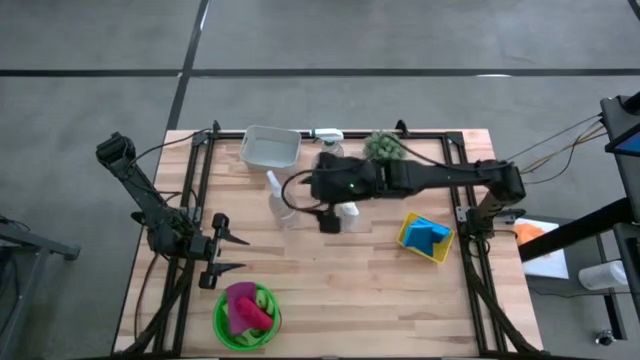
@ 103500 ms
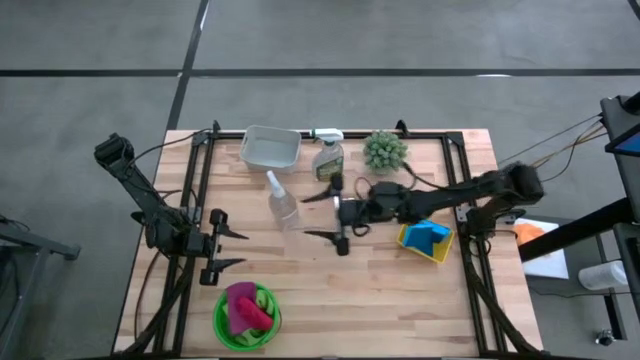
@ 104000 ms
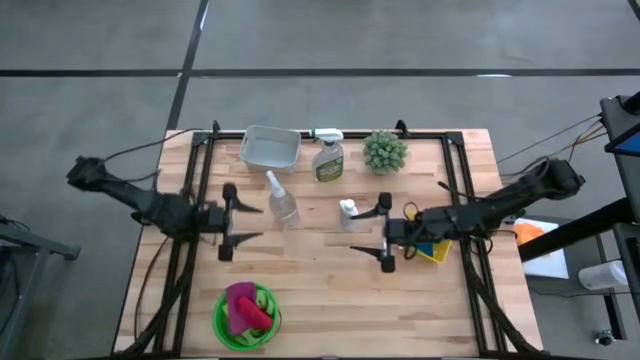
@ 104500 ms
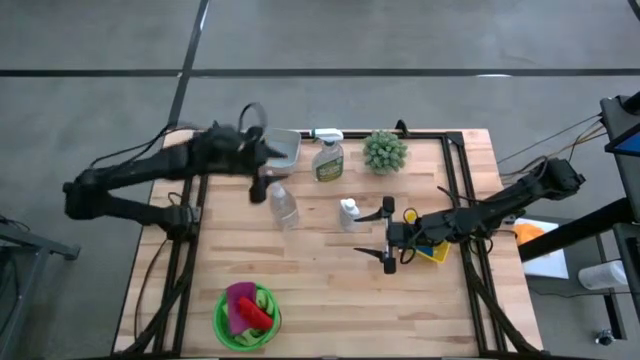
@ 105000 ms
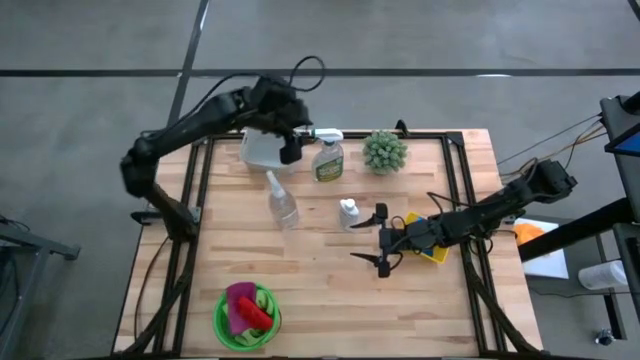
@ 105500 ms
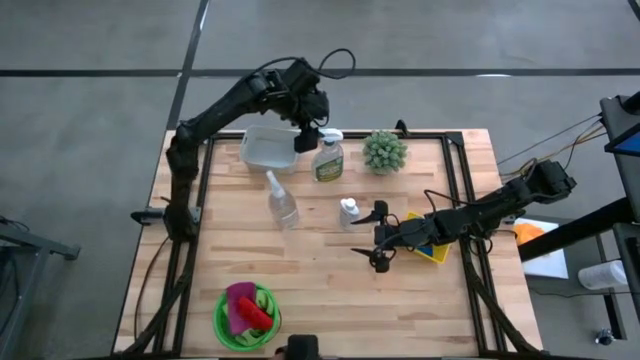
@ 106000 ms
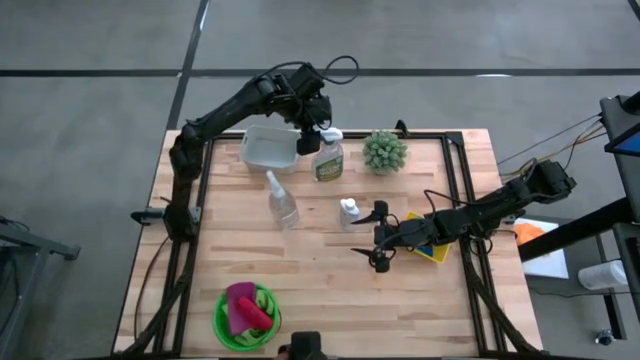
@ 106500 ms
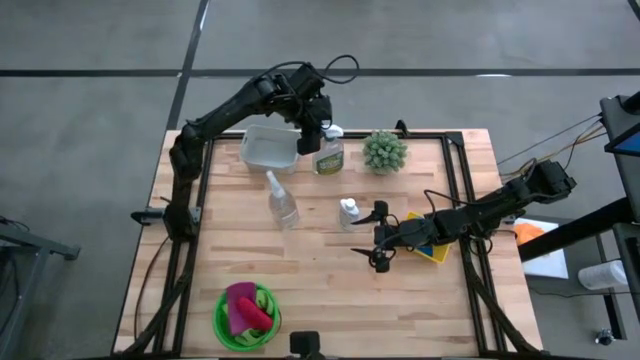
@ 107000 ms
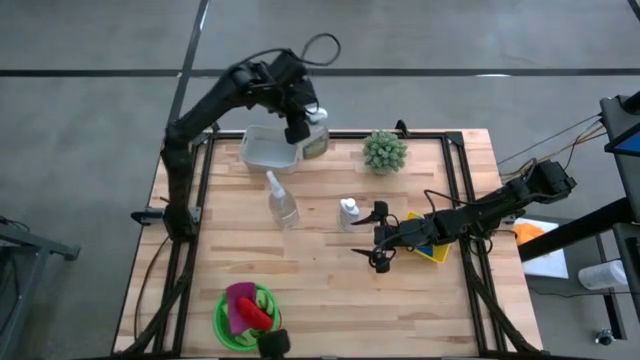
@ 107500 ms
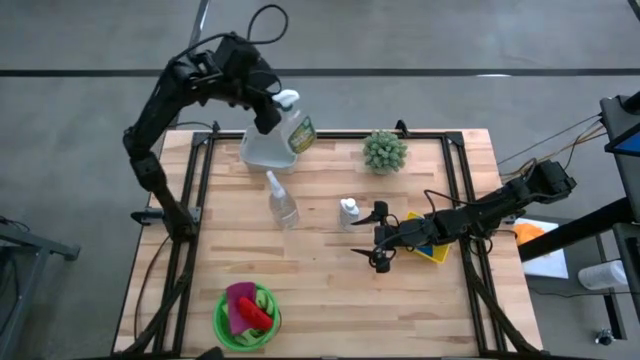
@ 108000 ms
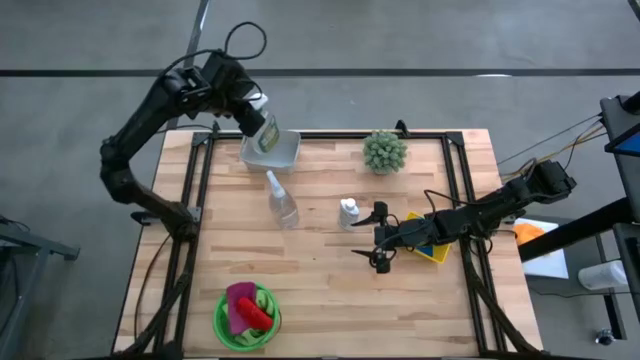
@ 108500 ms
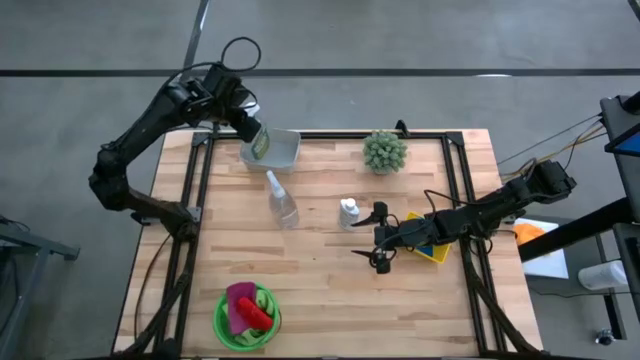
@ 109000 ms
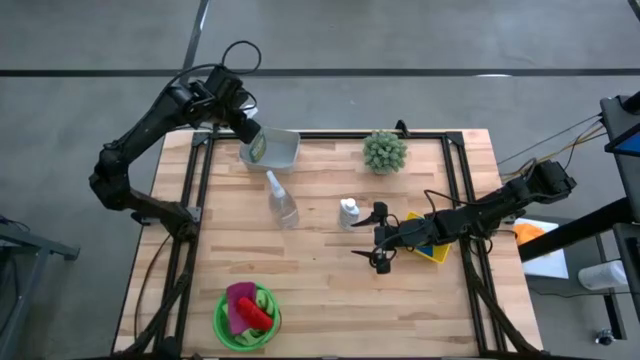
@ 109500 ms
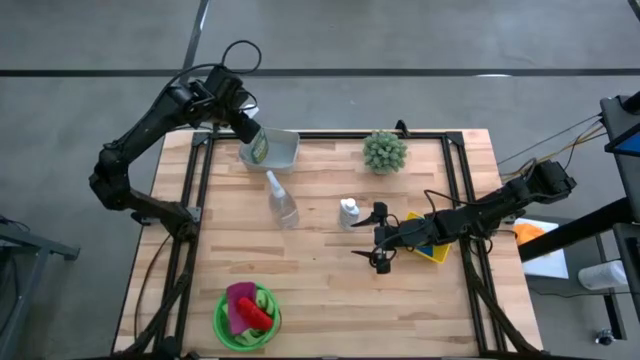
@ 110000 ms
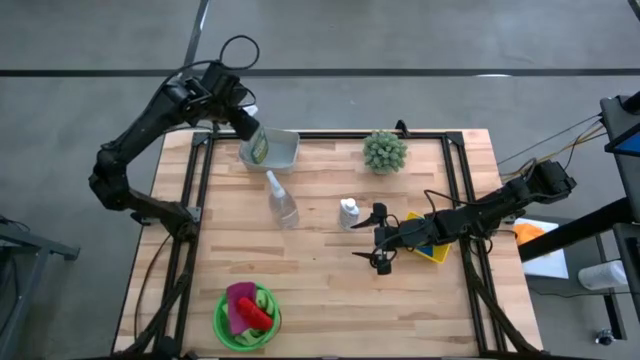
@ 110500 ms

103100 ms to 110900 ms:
Task: Pick & Place Kitchen Items
Put the white spray bottle into the gray bin

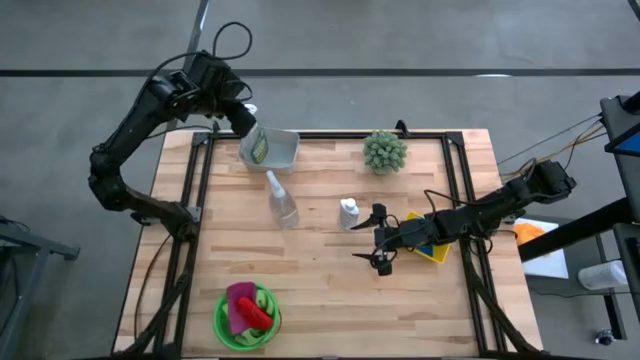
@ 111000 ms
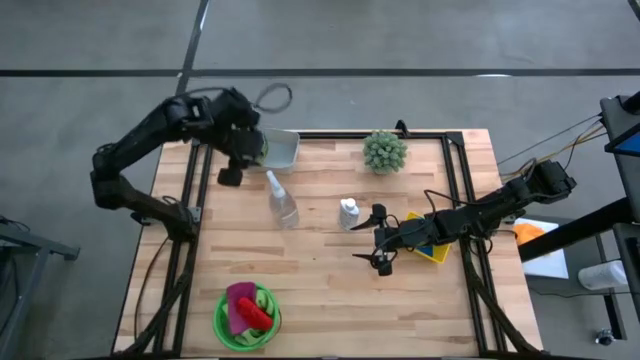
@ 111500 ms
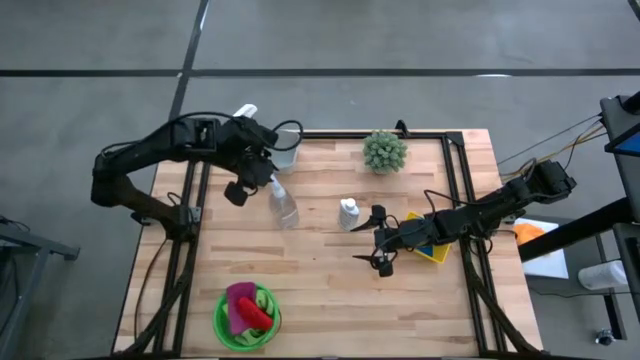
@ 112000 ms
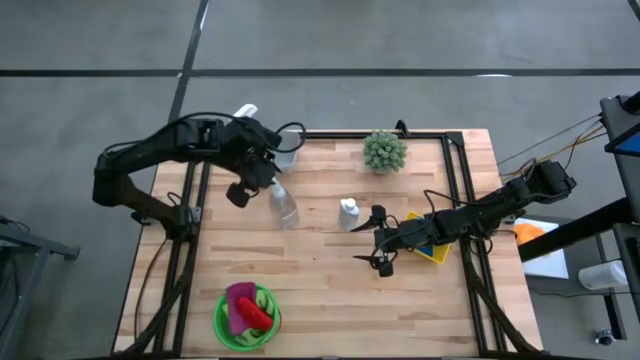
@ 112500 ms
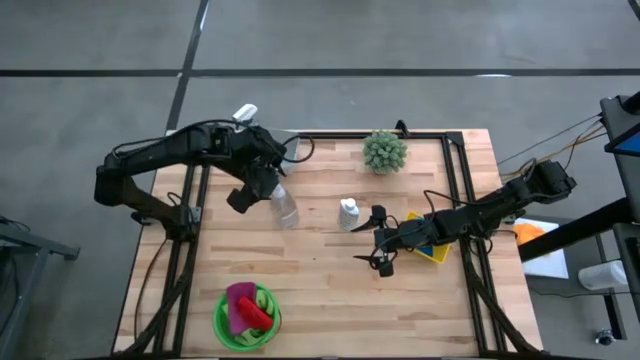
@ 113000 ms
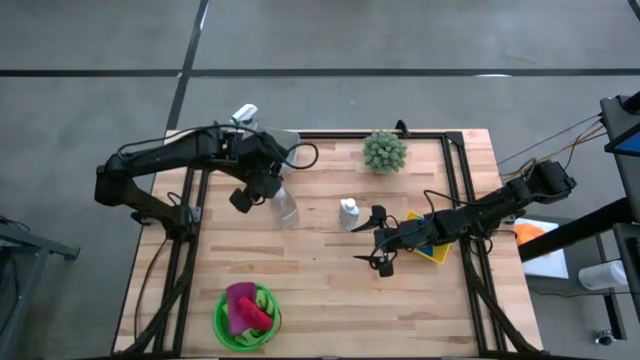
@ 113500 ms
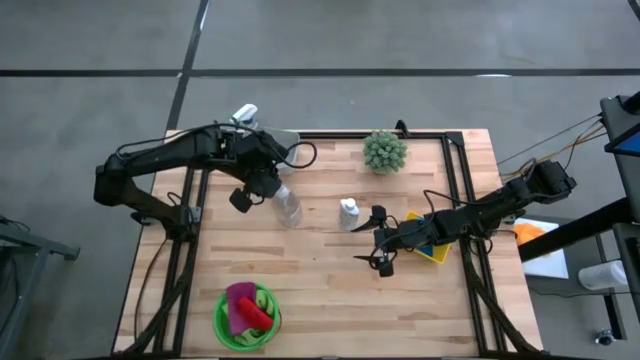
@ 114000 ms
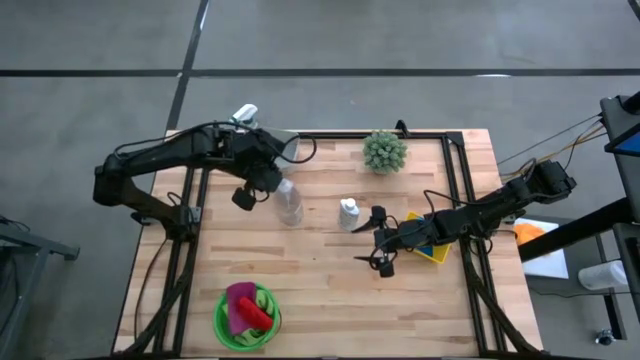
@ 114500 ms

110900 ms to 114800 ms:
Put the transparent spray bottle into the gray bin

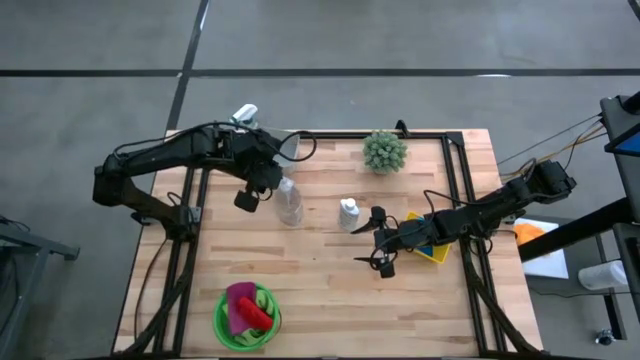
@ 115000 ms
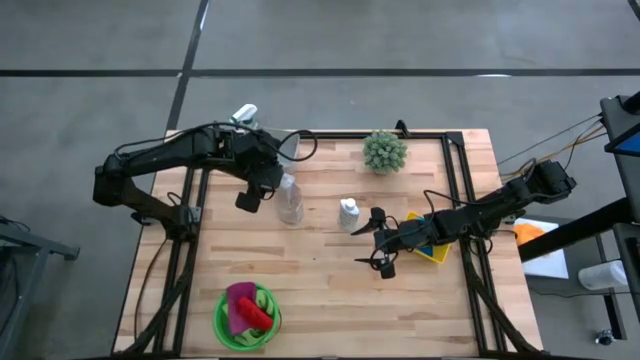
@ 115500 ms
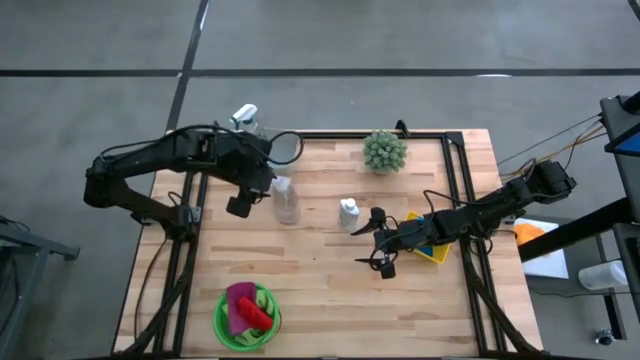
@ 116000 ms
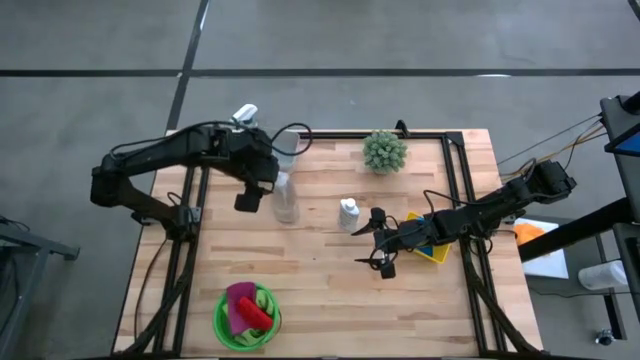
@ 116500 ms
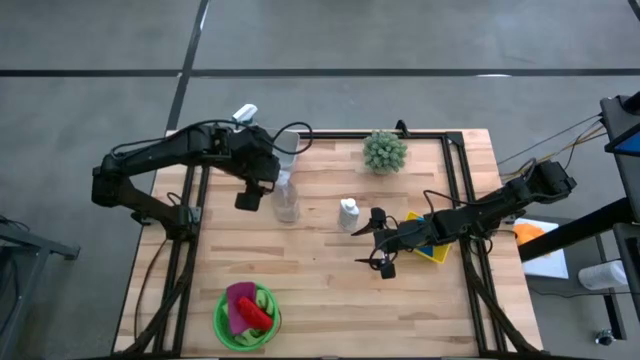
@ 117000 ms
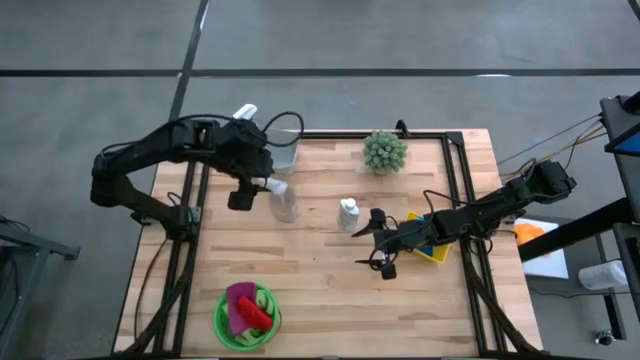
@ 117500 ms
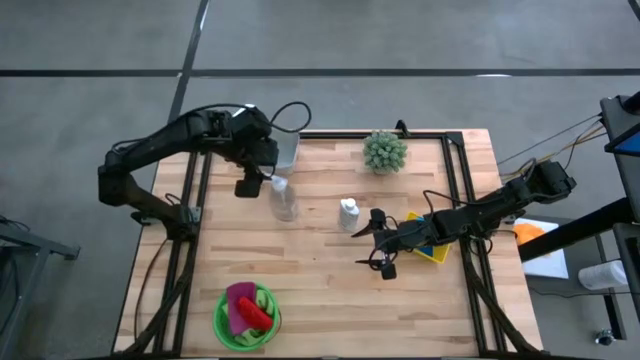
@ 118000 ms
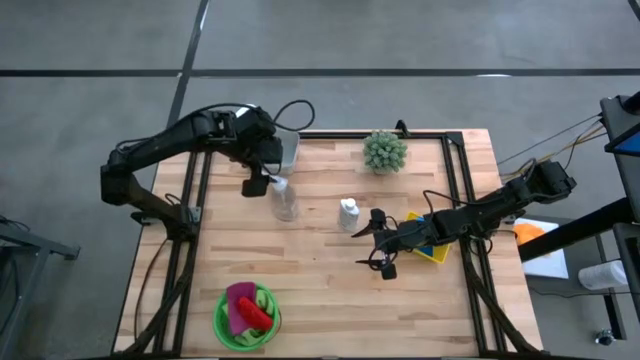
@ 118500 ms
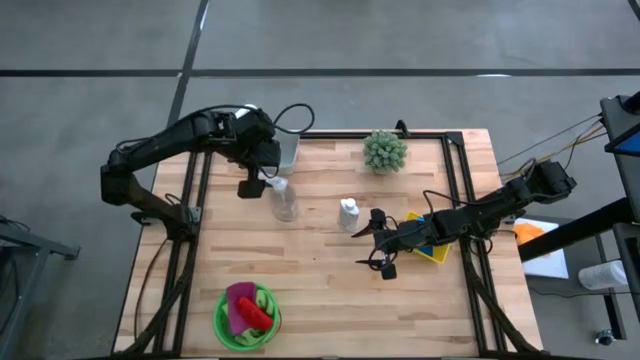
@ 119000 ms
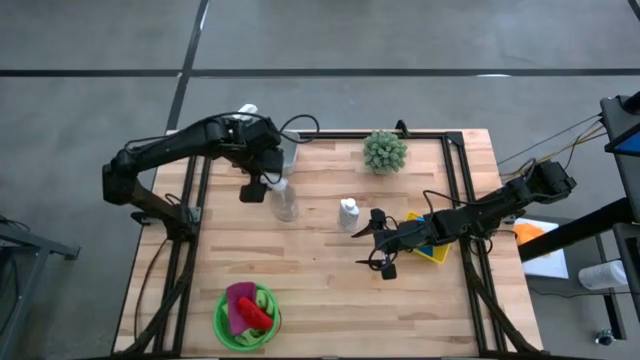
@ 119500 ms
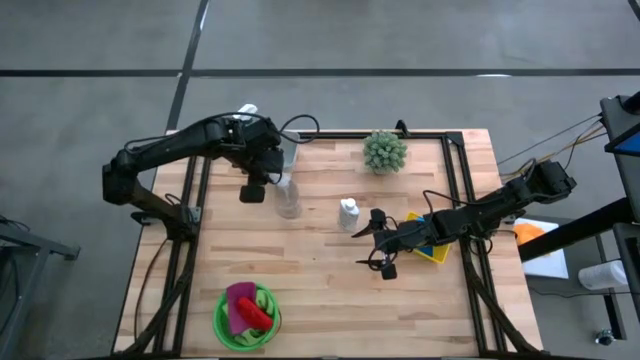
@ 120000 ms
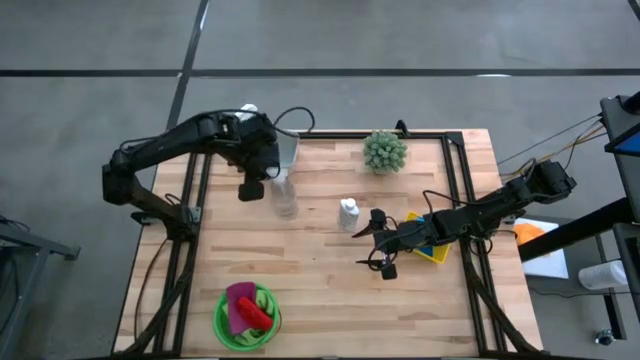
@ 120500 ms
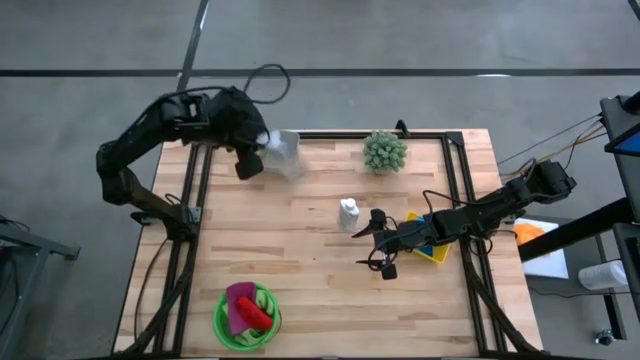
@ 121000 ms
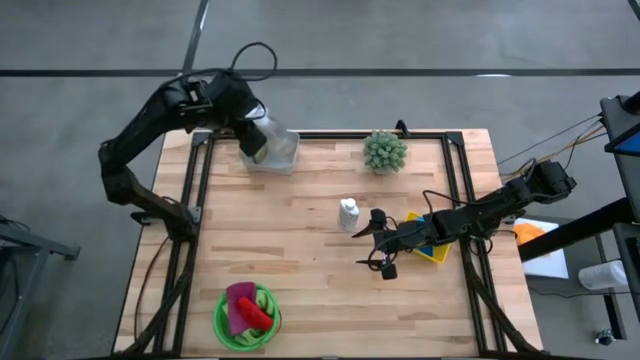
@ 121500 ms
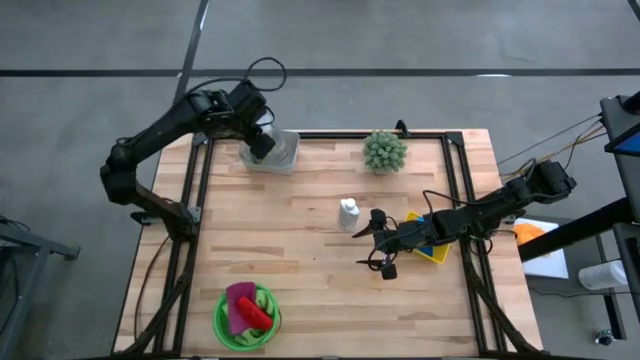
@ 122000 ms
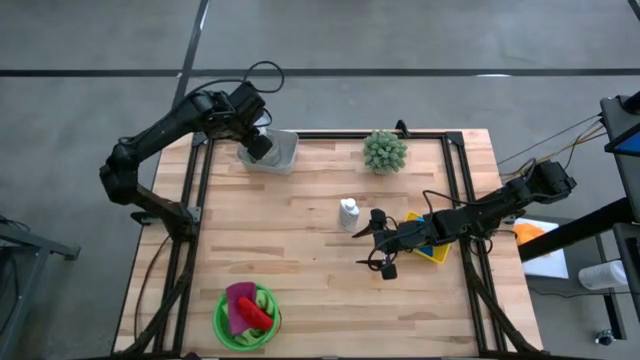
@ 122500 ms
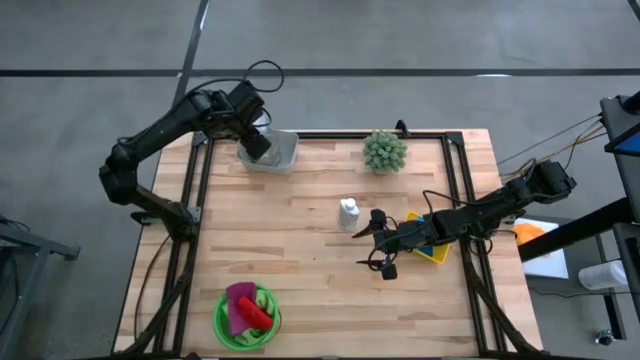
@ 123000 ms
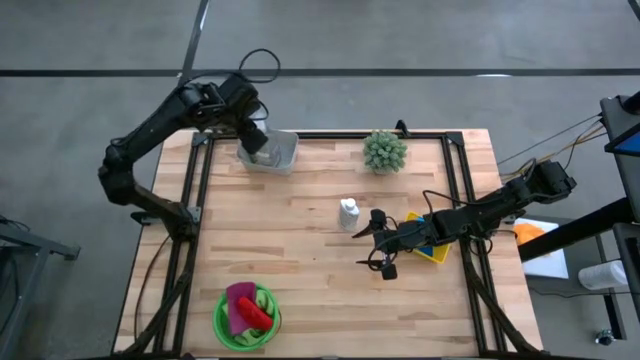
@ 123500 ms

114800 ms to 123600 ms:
Put the transparent spray bottle into the gray bin
